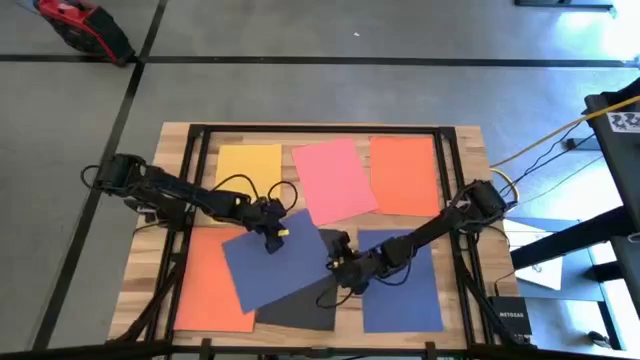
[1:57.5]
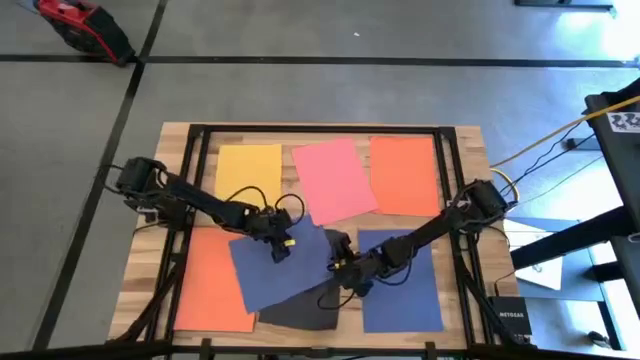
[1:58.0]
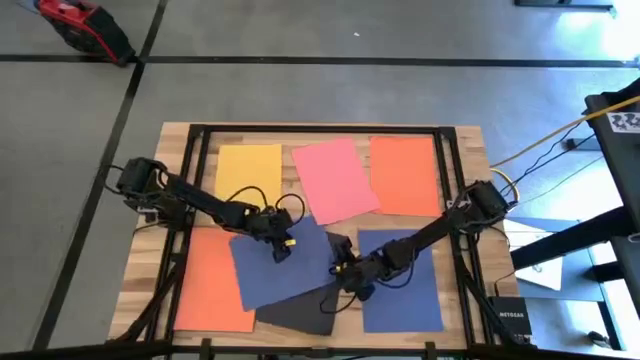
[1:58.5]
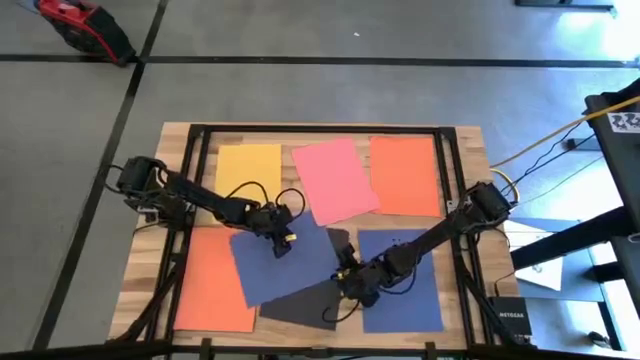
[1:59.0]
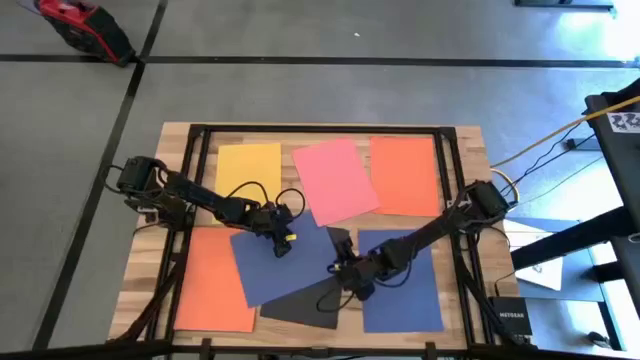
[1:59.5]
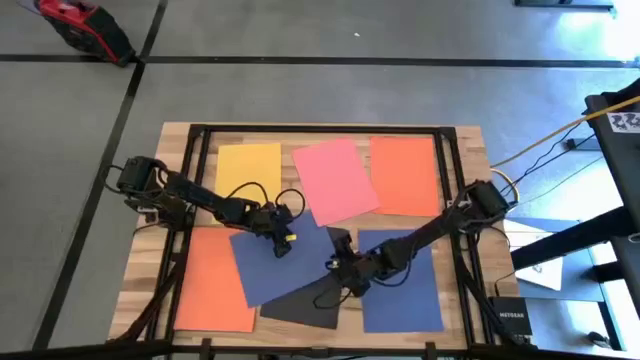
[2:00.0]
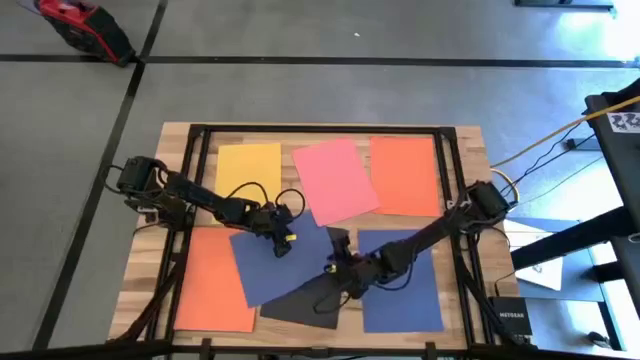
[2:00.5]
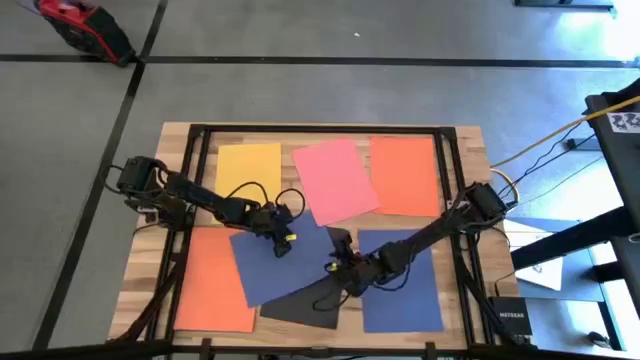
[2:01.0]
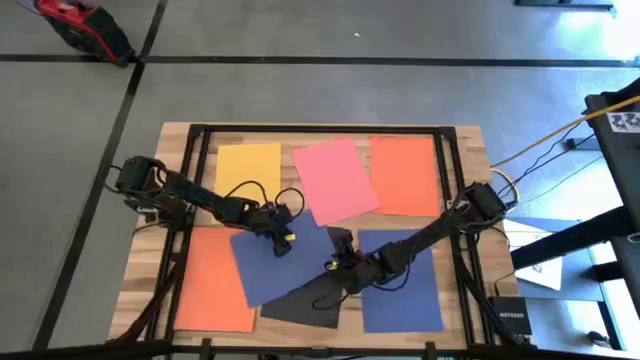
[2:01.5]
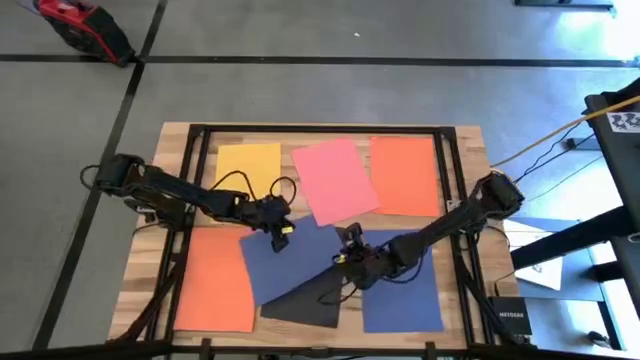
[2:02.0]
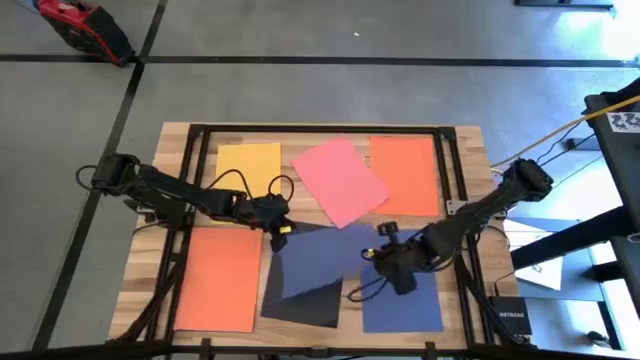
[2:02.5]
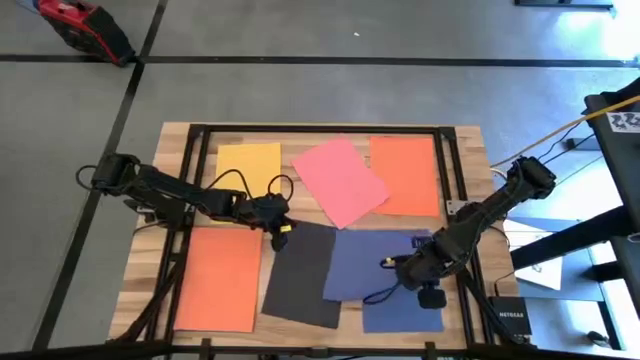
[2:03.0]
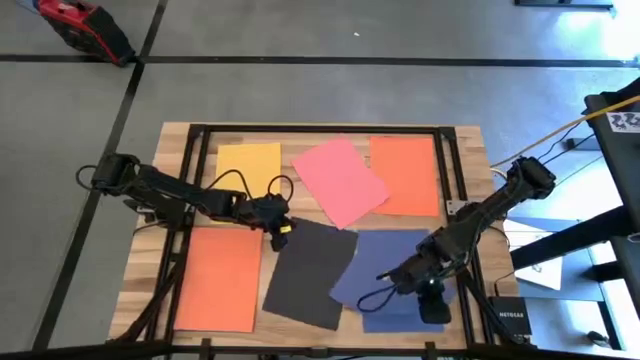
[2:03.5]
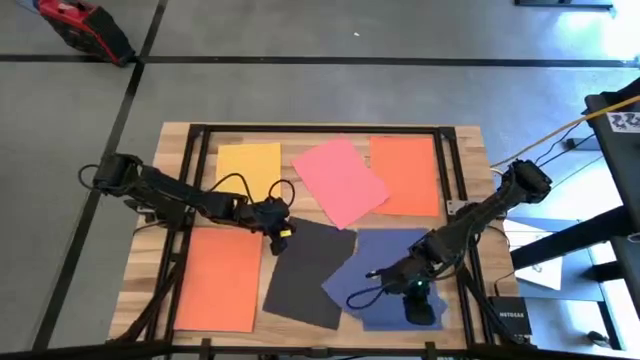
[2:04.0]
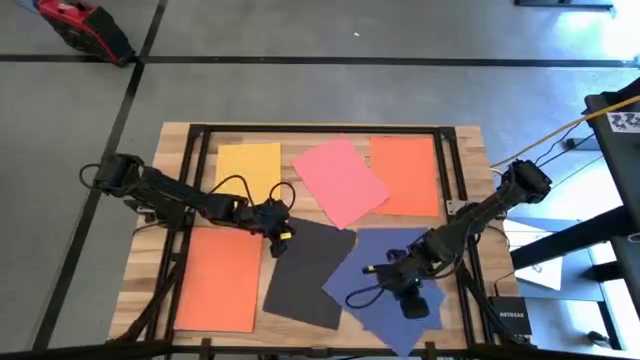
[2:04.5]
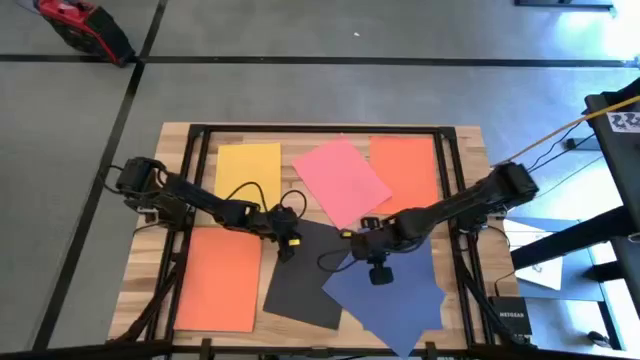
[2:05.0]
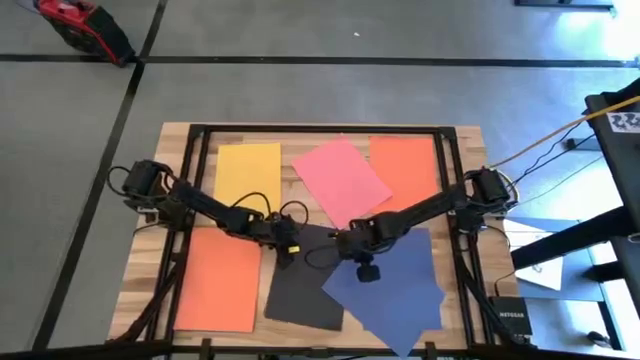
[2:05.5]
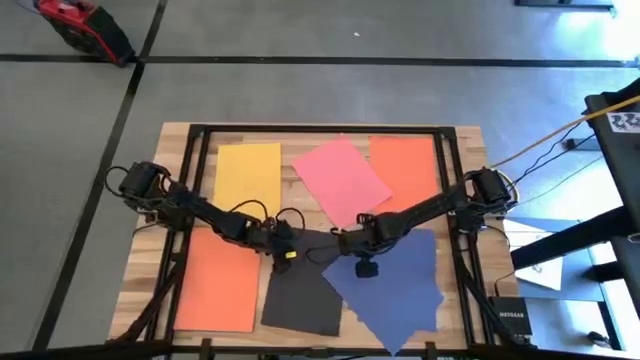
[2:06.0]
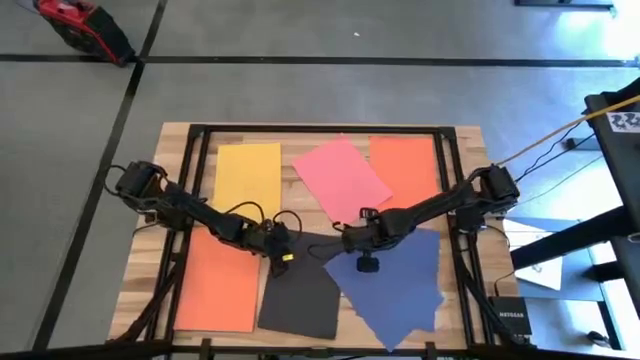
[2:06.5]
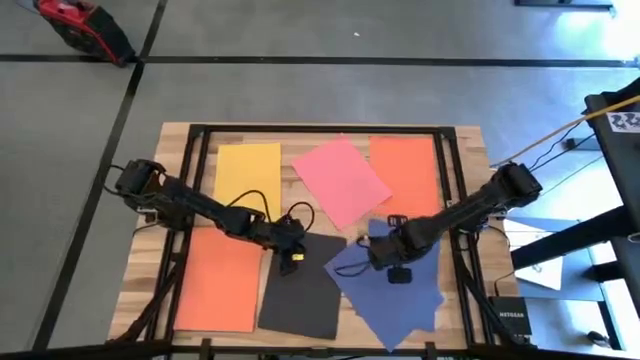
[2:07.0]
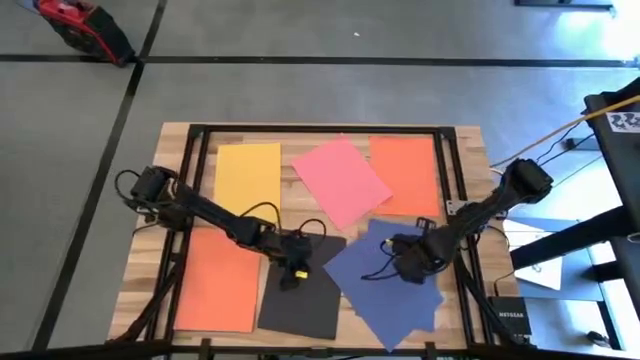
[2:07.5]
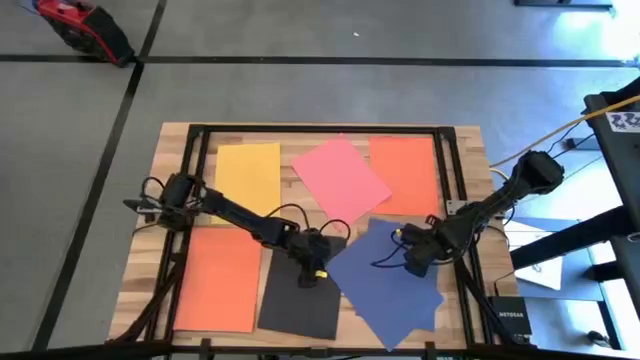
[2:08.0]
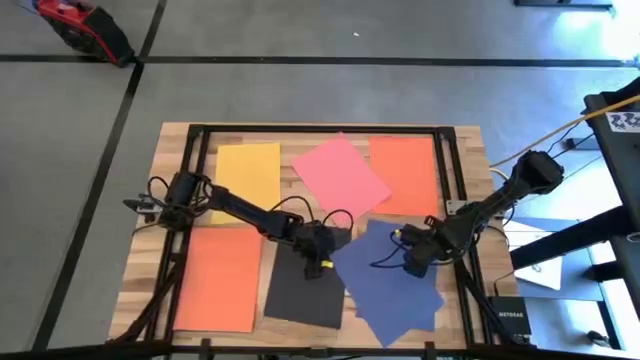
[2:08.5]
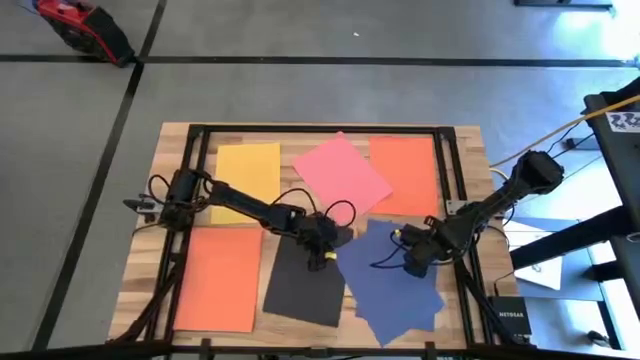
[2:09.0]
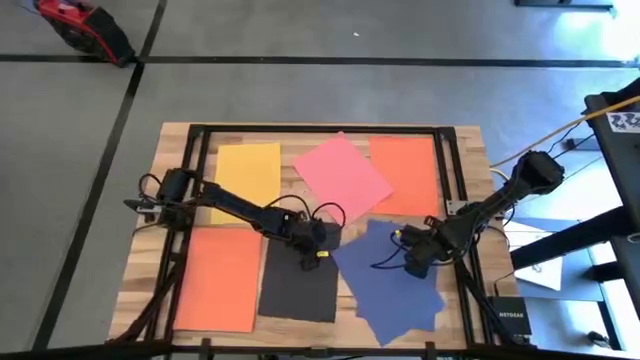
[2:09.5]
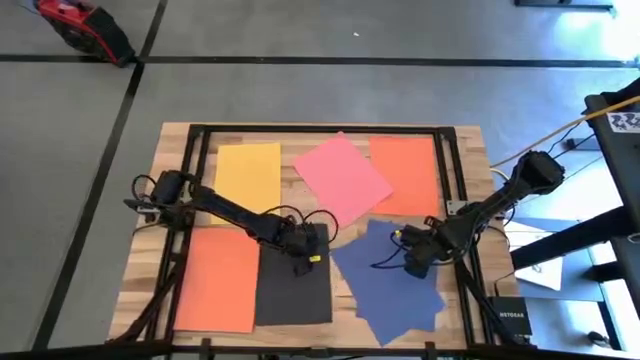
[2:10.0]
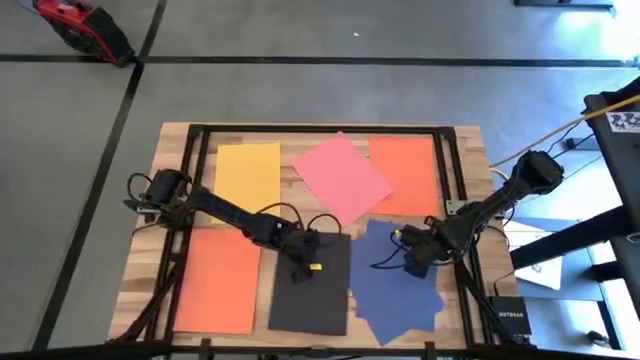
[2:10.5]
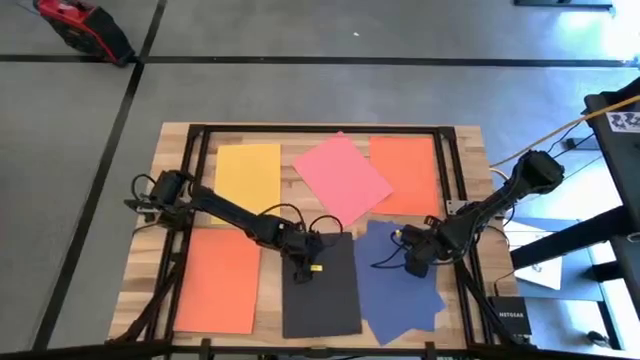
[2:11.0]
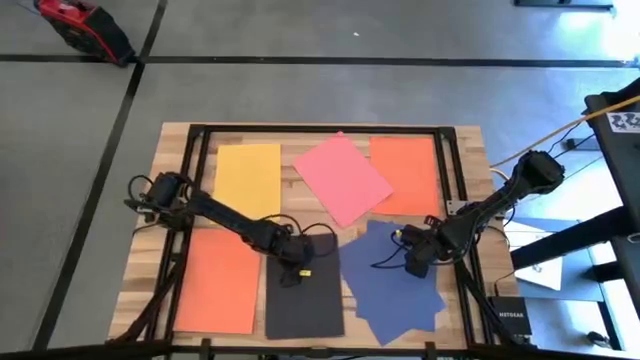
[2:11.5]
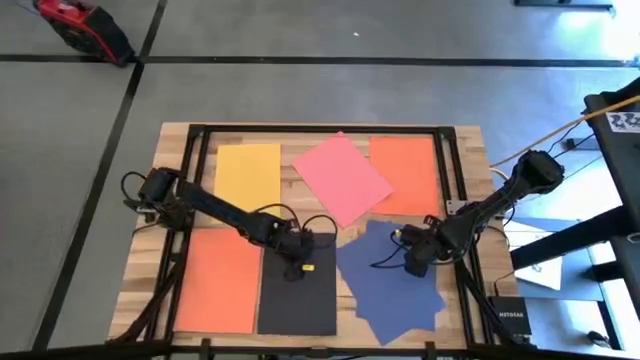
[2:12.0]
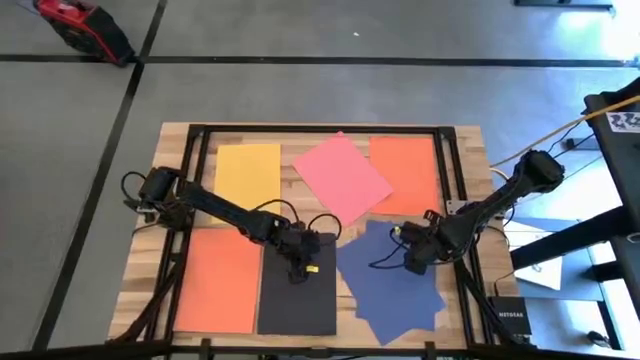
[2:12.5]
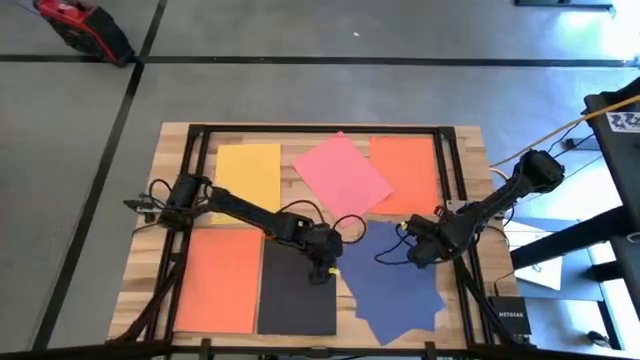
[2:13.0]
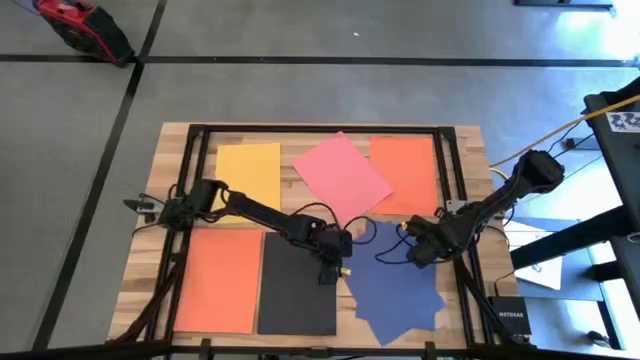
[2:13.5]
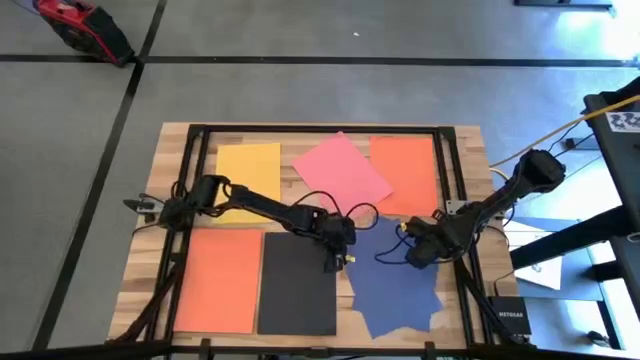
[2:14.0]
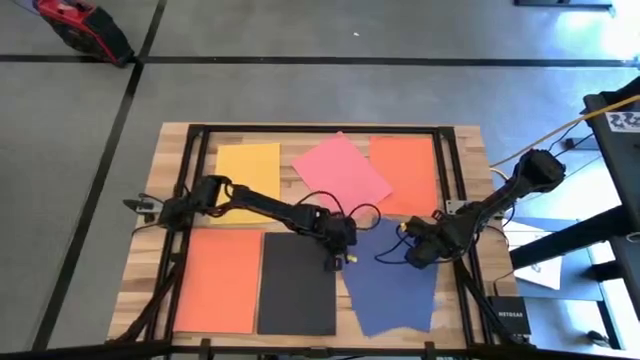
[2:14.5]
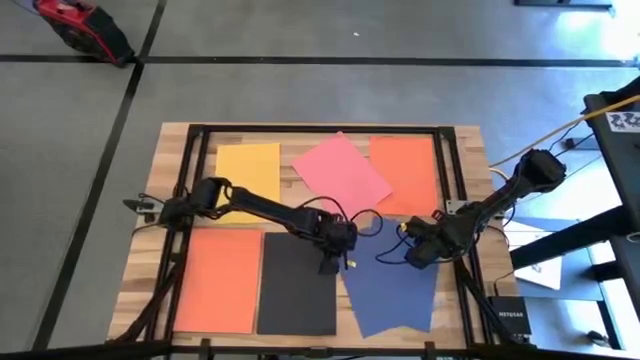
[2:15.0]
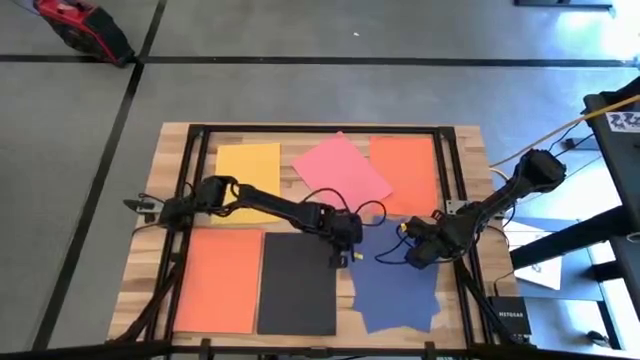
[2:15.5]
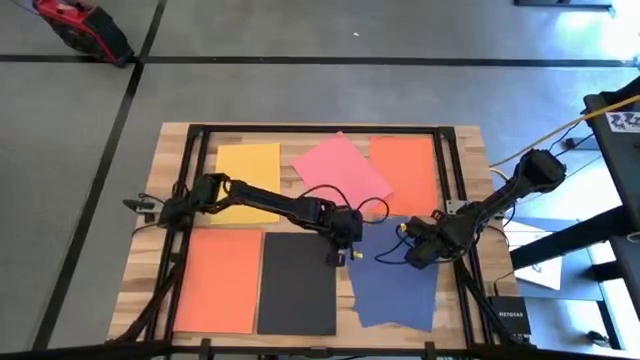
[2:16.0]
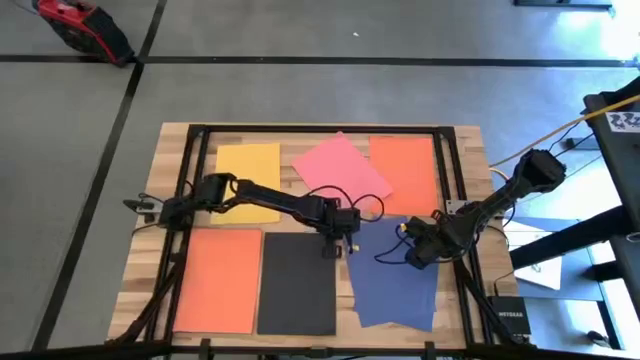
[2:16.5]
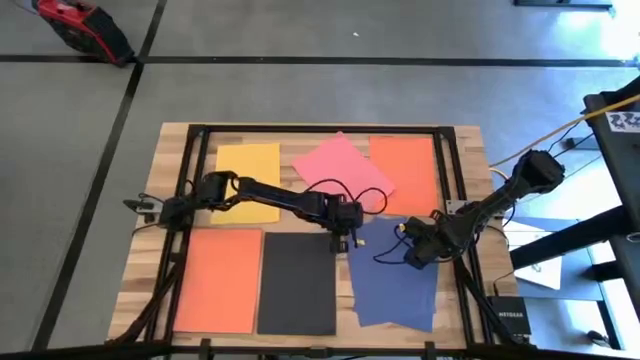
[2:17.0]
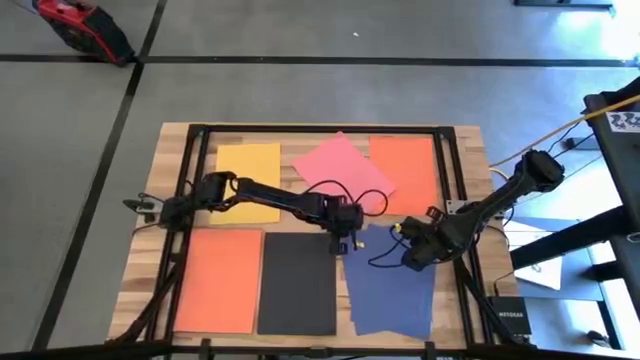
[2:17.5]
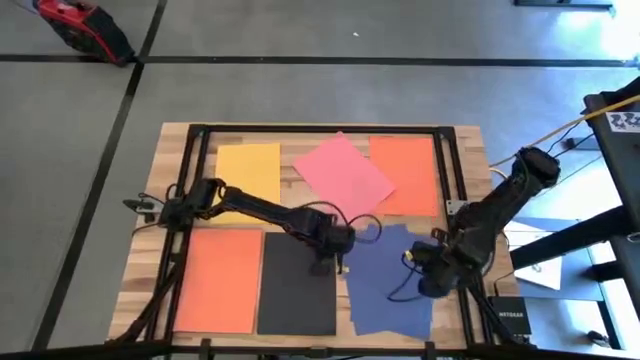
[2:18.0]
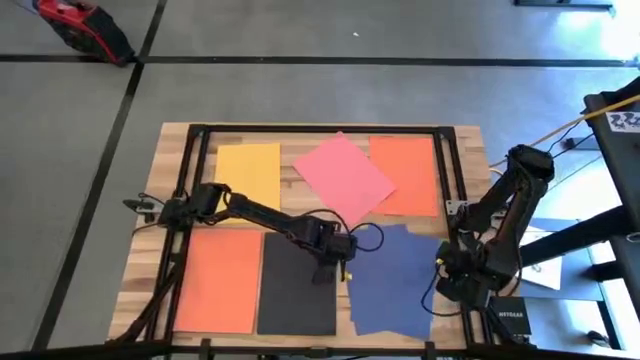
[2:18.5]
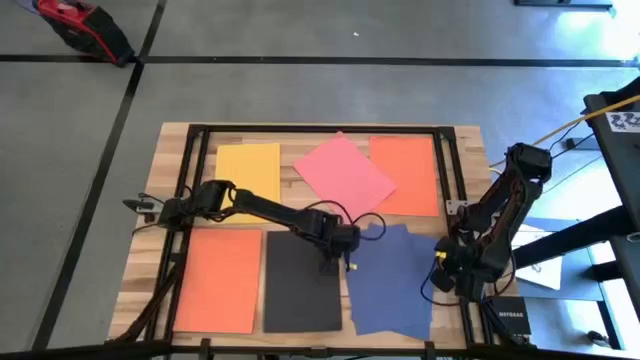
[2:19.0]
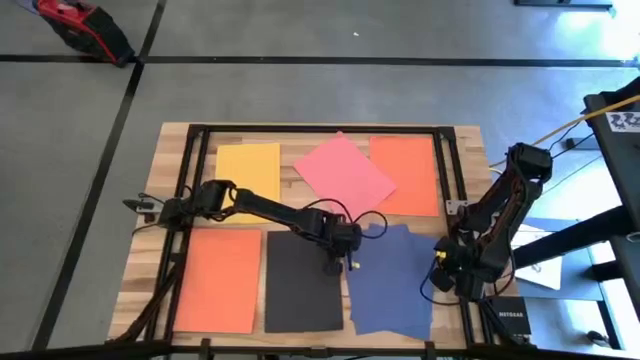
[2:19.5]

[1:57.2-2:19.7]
Task: Organize paper
Stack the blue paper on top of the blue paper on the table
